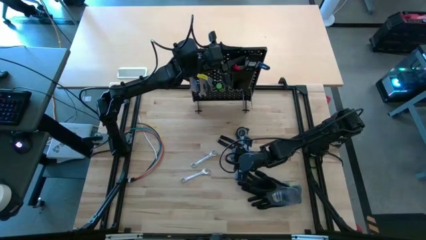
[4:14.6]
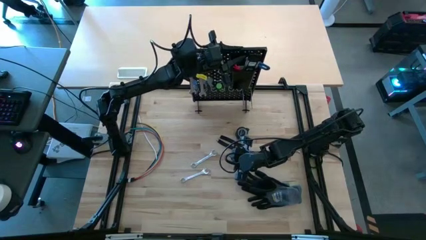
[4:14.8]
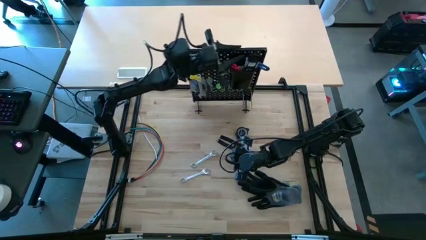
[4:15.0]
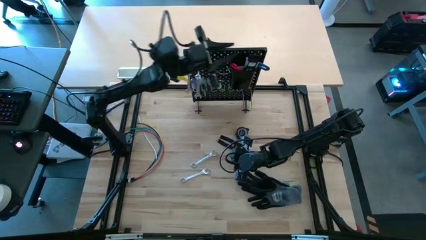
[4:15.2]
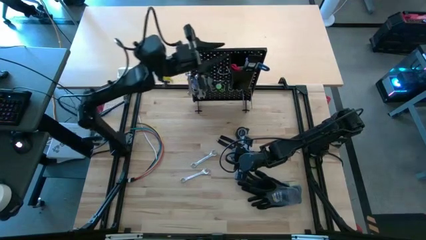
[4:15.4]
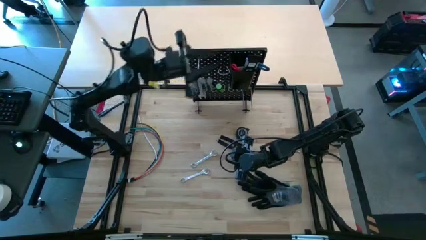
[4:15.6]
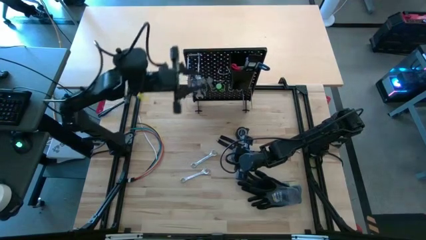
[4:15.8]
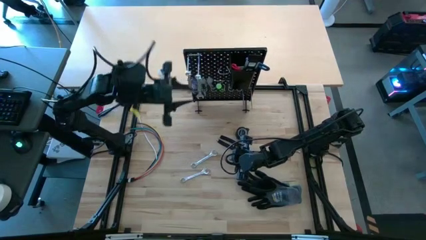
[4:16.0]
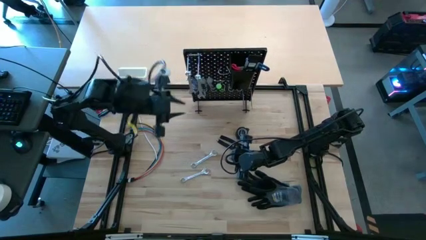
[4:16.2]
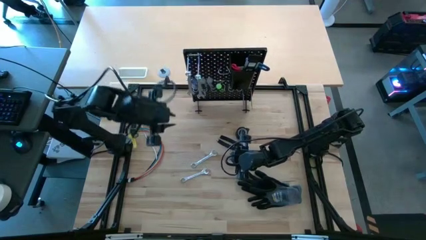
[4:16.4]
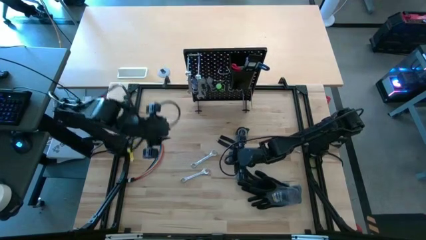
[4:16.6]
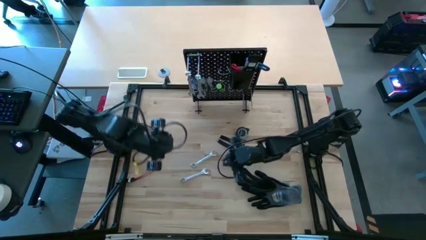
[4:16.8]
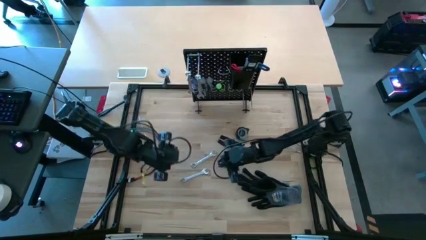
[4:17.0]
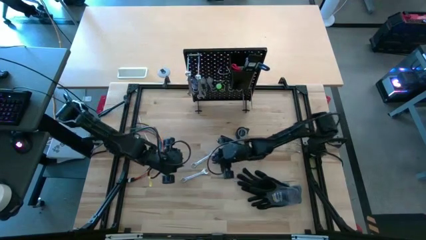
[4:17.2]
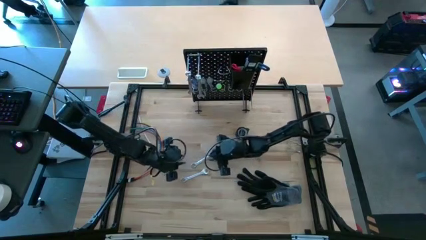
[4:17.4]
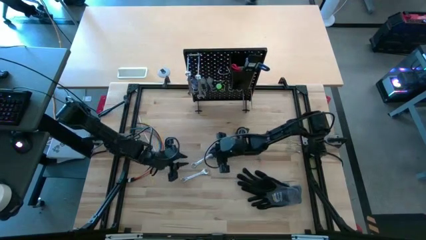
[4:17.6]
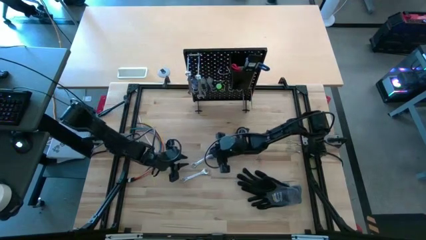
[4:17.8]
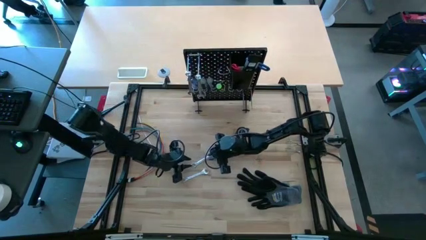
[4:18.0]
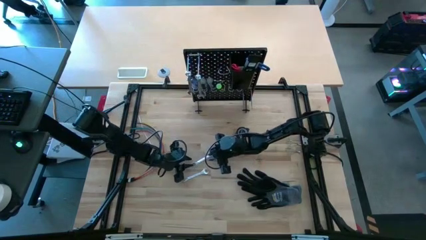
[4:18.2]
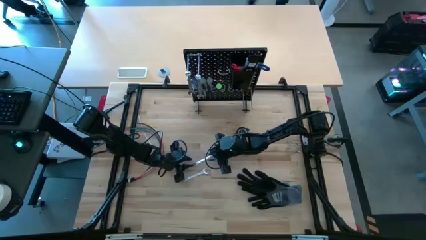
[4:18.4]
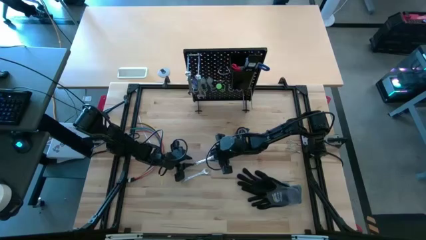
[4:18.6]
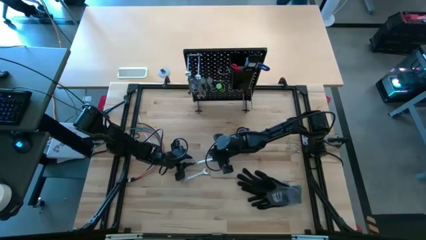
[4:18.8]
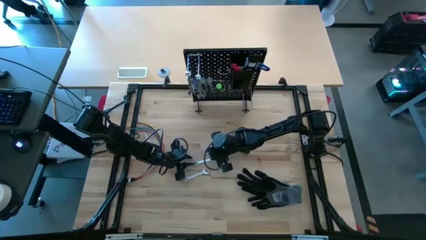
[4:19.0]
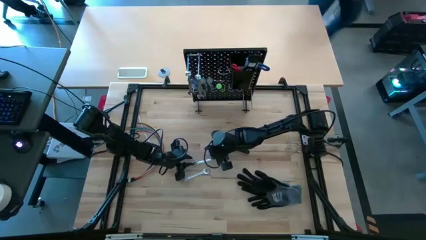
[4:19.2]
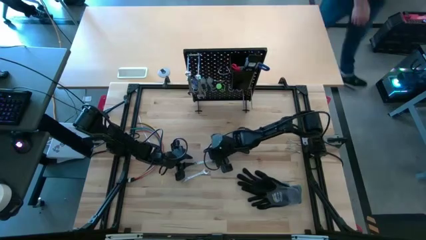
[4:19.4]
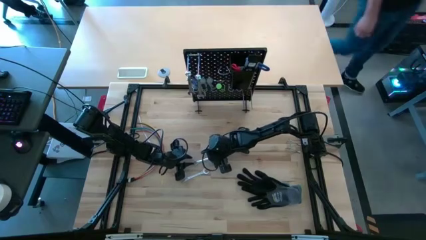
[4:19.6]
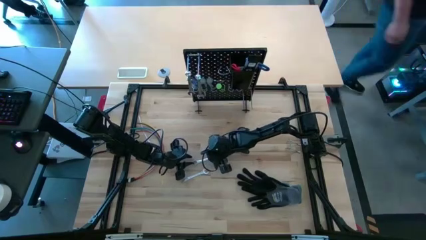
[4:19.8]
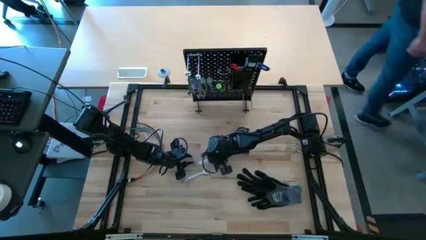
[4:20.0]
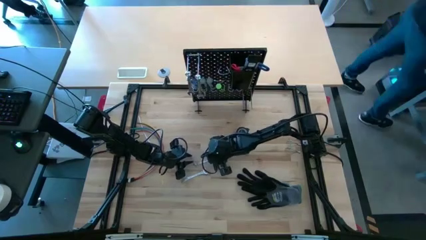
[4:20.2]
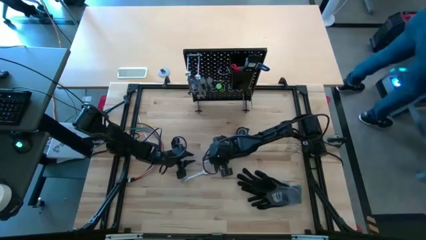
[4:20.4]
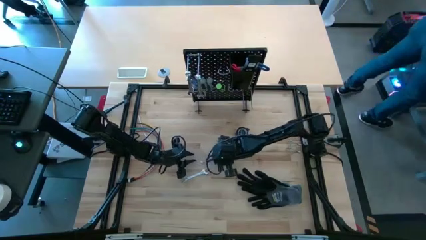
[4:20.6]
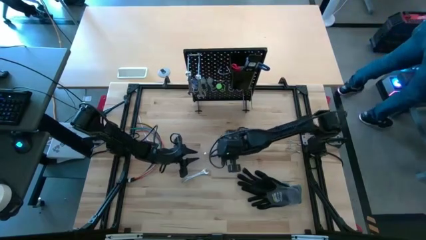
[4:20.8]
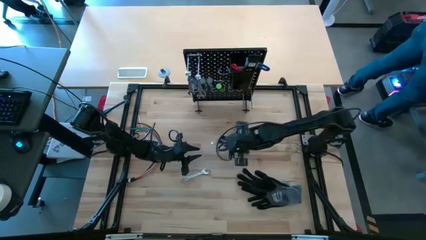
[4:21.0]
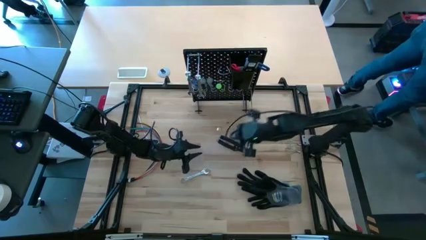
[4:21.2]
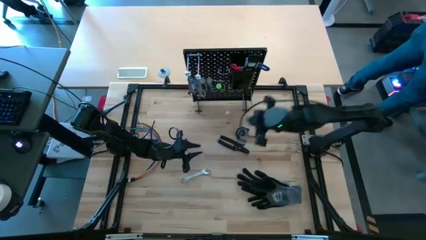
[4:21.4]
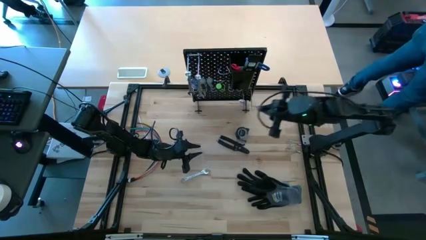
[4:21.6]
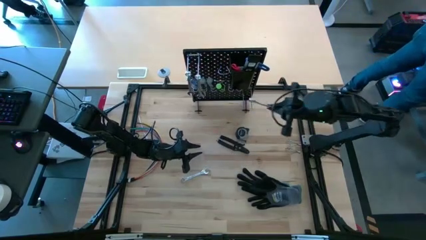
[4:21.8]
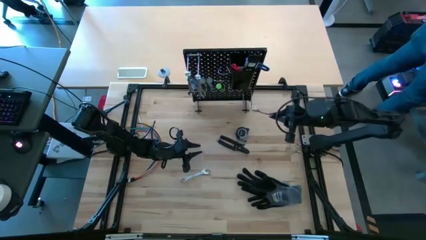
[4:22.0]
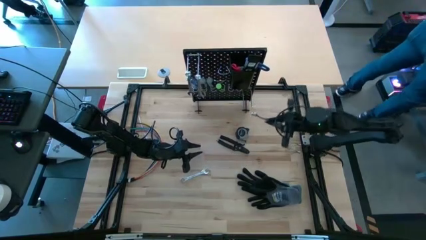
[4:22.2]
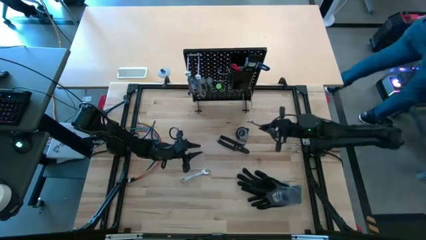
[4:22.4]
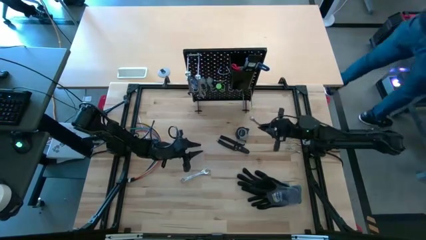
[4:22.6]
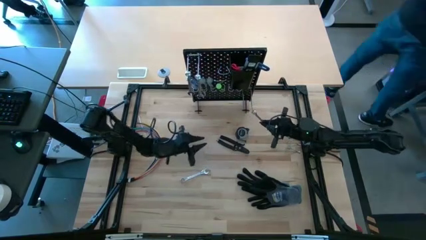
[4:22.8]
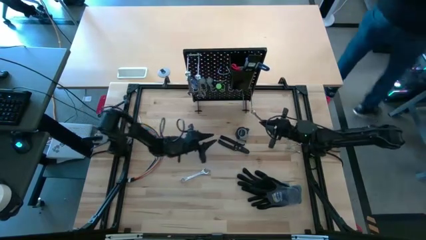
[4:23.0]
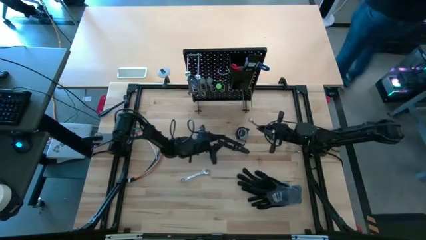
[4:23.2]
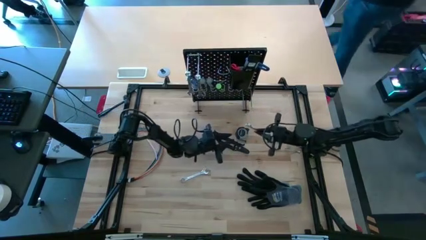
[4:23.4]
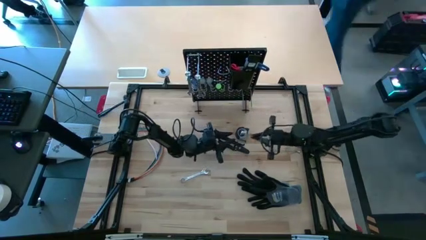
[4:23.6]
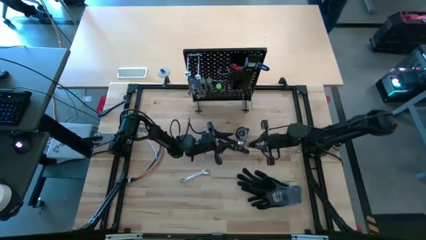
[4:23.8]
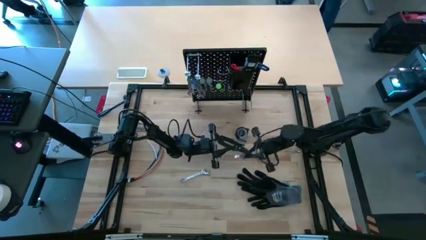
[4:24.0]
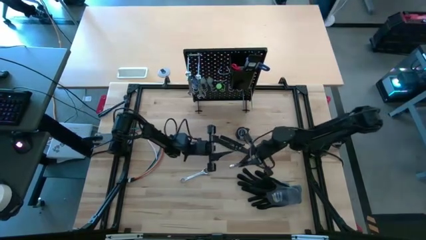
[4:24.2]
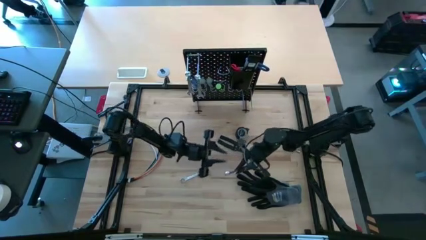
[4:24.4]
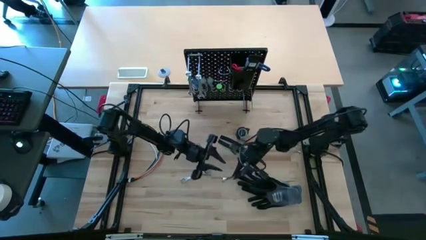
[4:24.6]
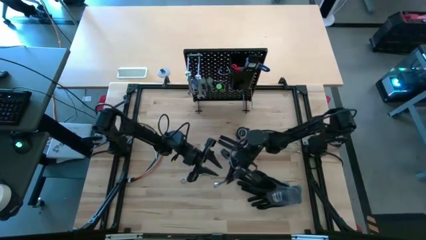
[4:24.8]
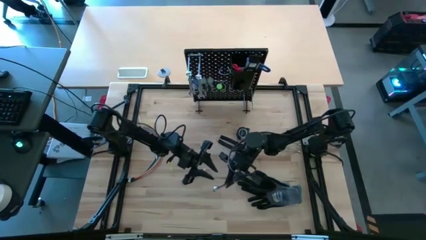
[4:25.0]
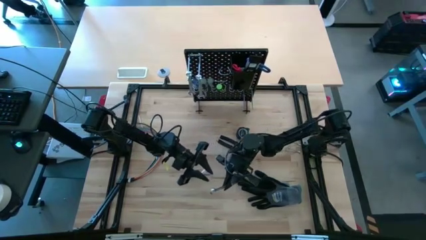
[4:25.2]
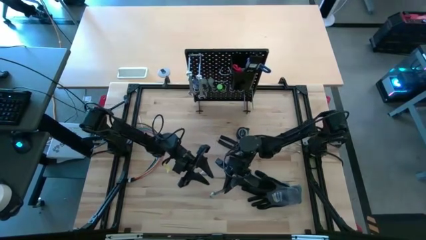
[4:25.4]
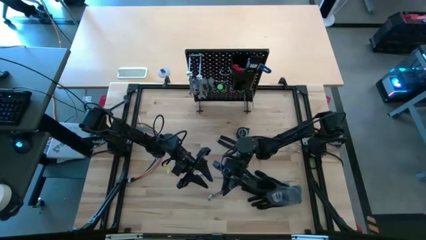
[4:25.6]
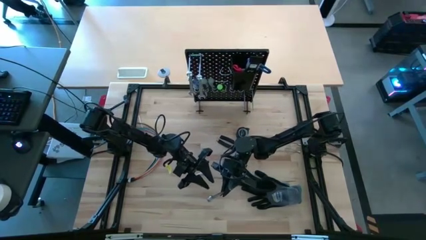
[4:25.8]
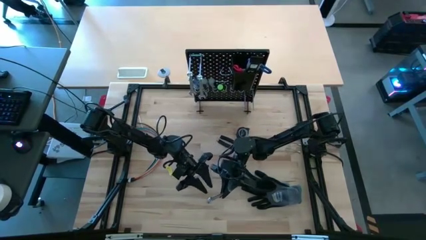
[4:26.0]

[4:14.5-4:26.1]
Task: Hang tools onto peg board
Hang the wrench on the peg board

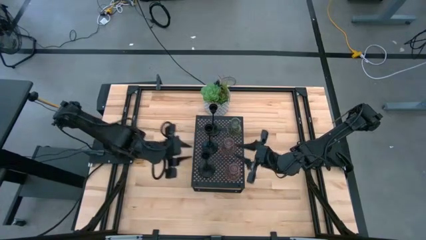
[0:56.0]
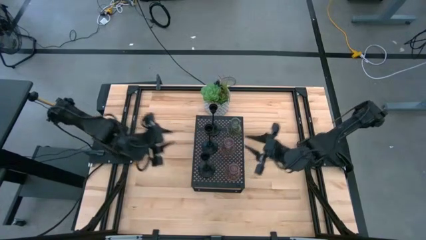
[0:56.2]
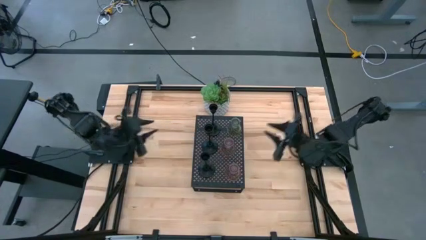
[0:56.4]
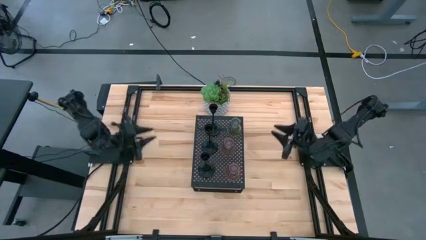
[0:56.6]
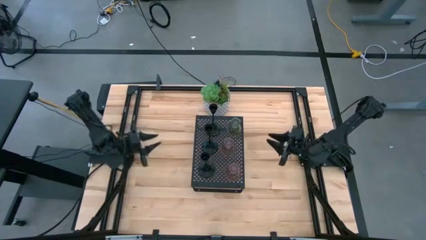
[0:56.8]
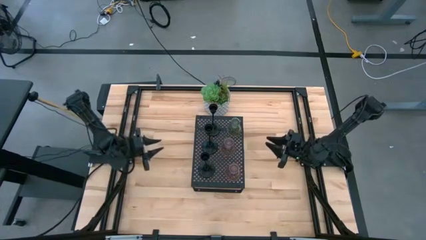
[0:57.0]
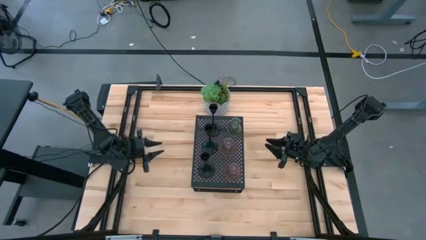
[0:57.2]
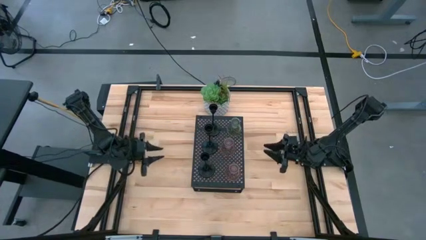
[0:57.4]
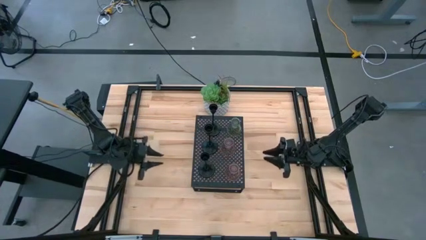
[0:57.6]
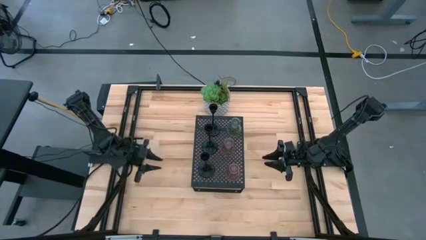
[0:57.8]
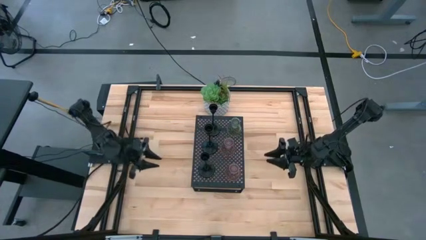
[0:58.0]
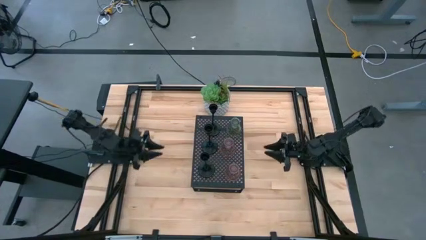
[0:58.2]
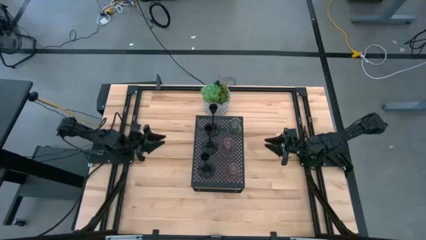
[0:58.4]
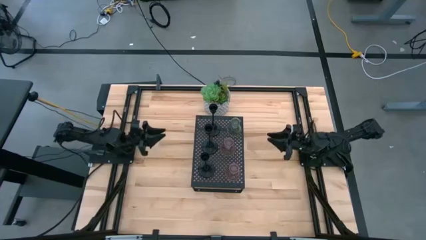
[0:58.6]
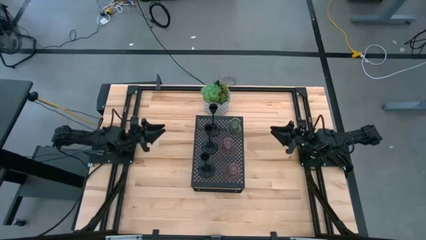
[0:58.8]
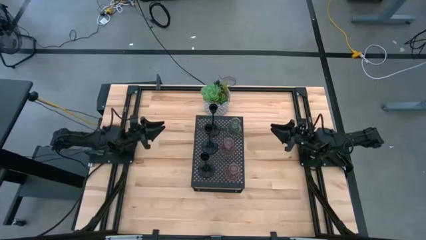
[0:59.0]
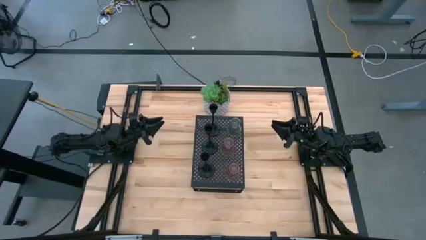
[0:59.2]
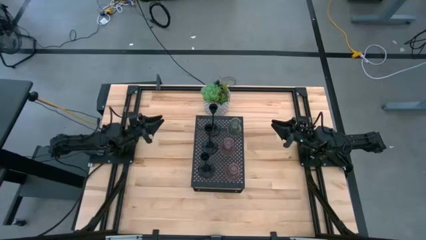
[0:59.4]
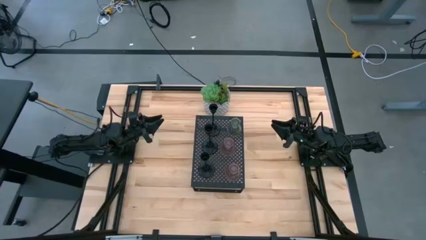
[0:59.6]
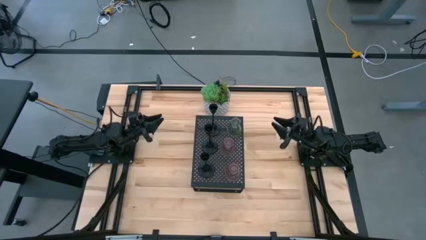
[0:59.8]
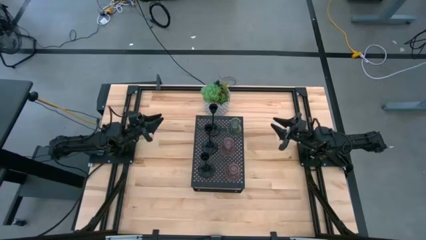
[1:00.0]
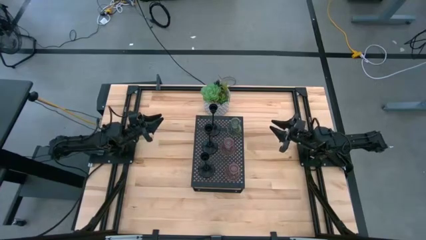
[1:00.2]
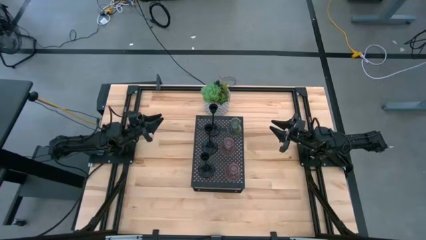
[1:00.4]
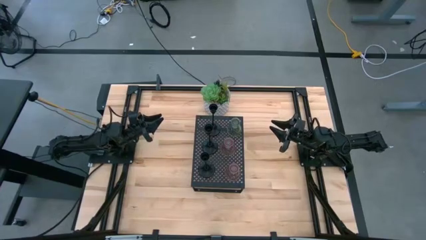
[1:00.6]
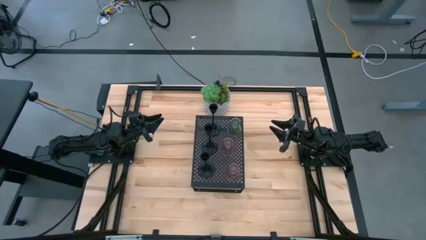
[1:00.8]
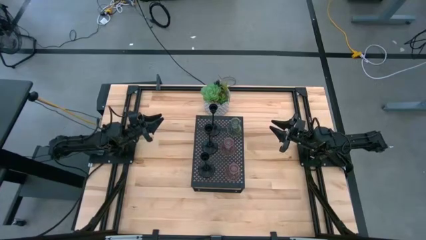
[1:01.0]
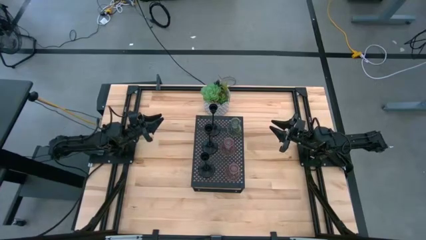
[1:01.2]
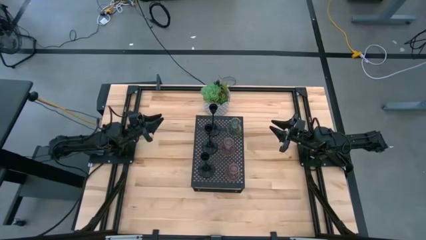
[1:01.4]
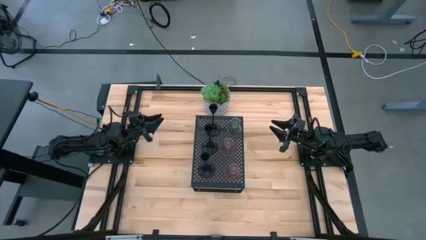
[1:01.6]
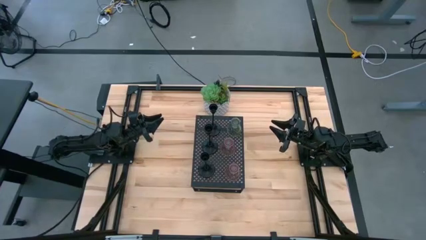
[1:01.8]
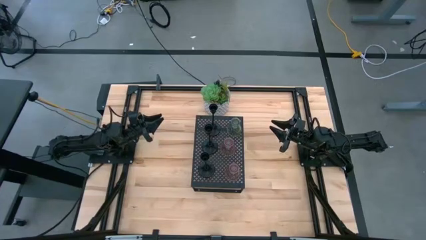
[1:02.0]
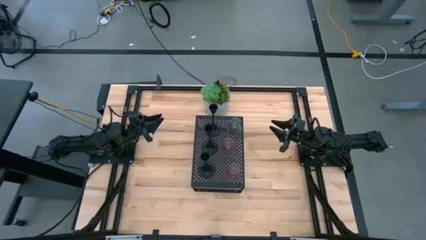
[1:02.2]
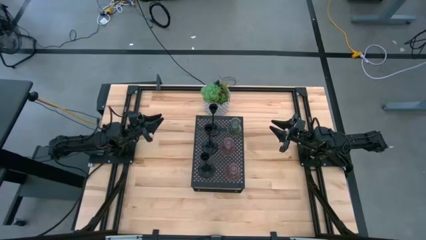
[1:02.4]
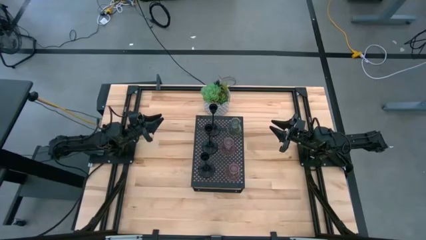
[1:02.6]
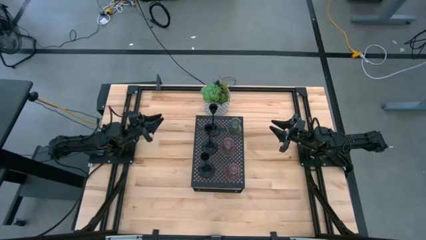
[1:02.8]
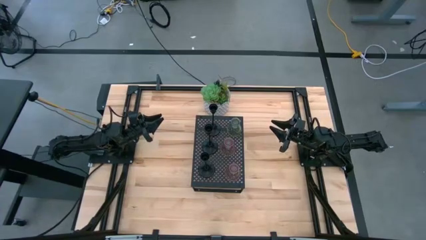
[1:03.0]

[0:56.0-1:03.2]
Task: Pick & Place candle stick holders
Return to Home Position
